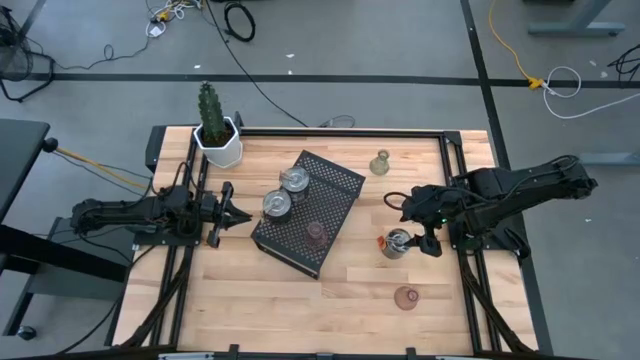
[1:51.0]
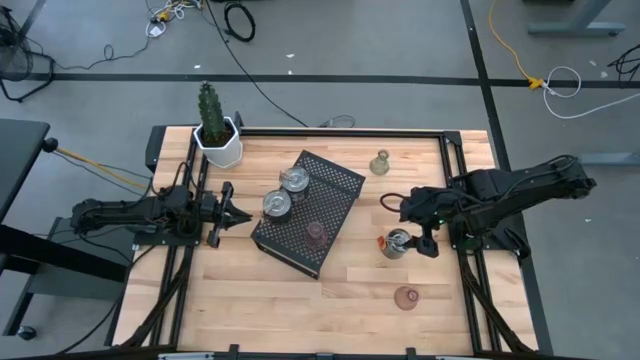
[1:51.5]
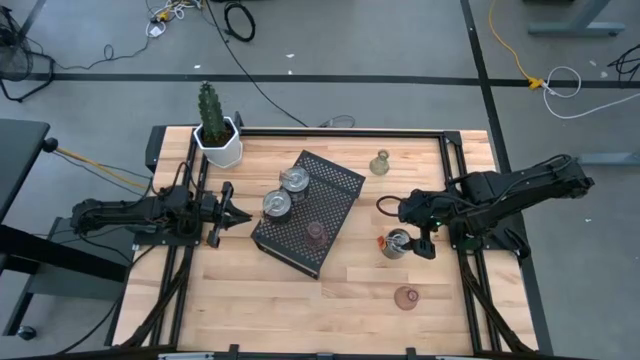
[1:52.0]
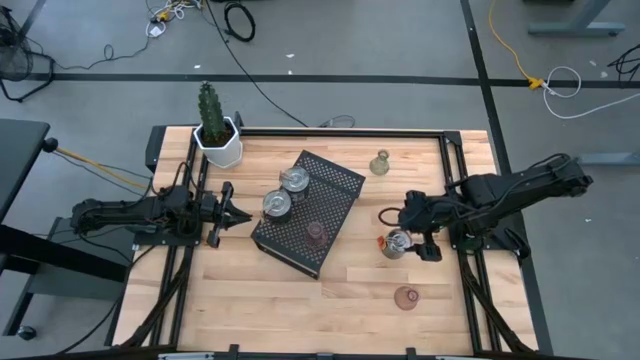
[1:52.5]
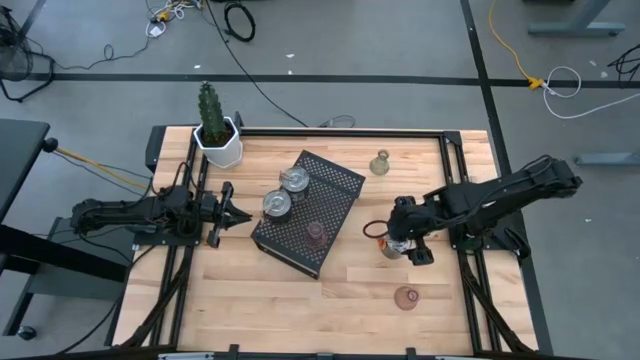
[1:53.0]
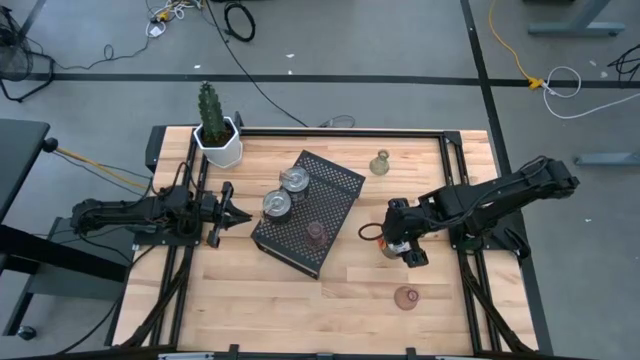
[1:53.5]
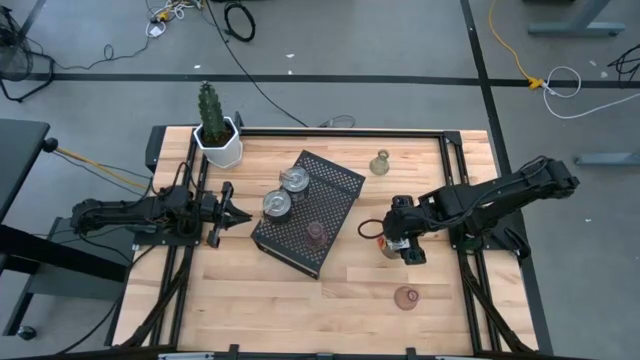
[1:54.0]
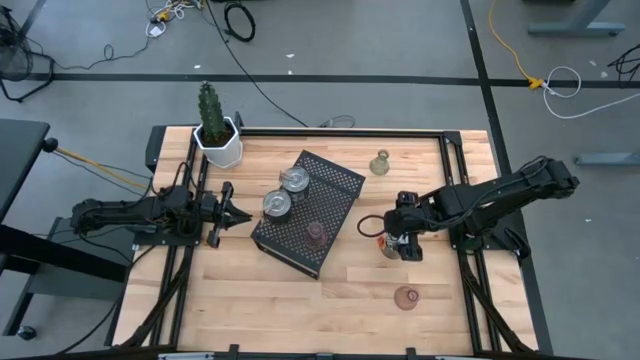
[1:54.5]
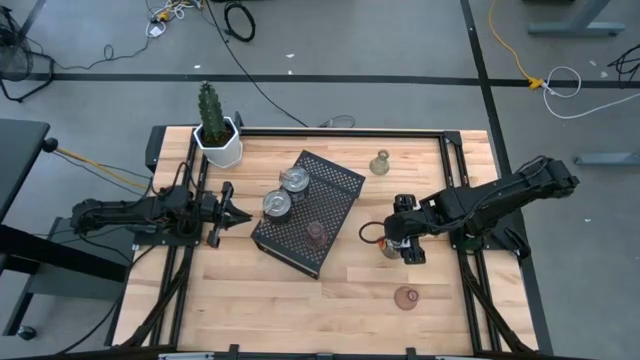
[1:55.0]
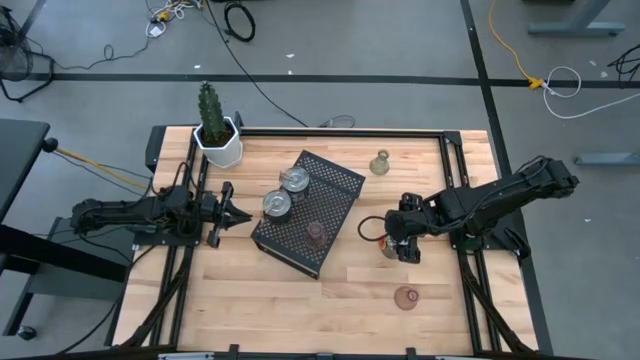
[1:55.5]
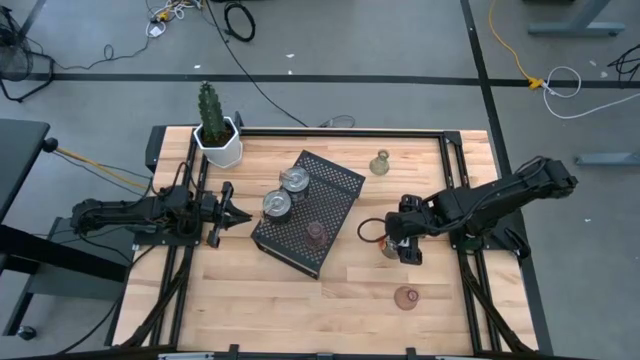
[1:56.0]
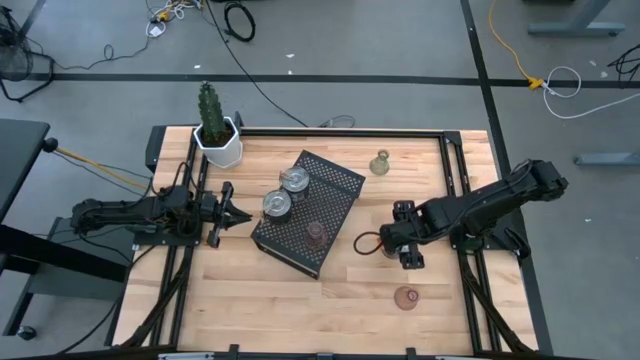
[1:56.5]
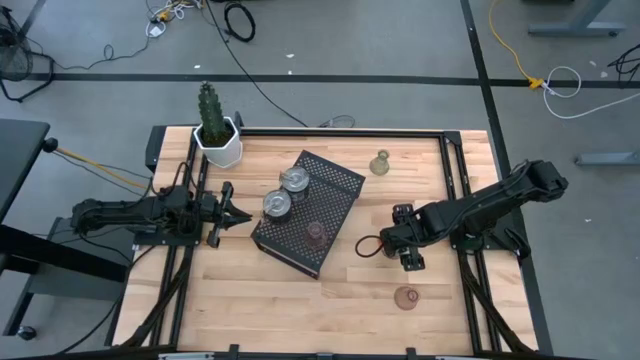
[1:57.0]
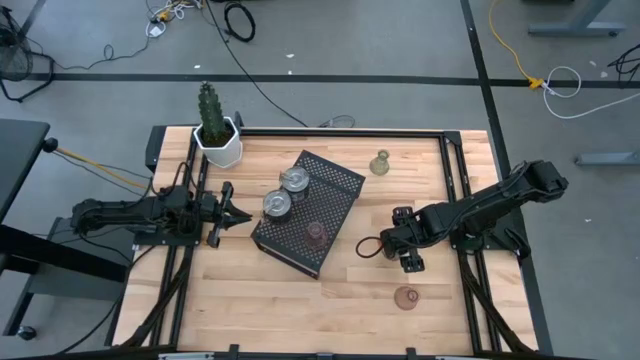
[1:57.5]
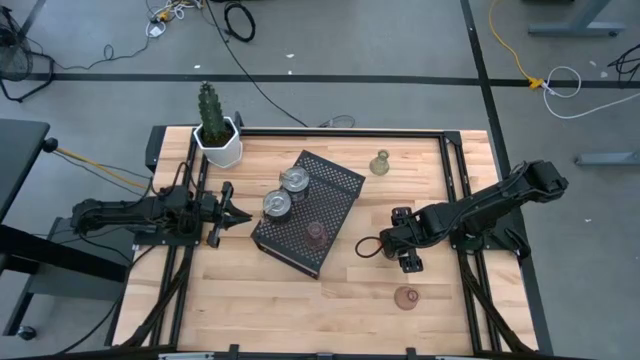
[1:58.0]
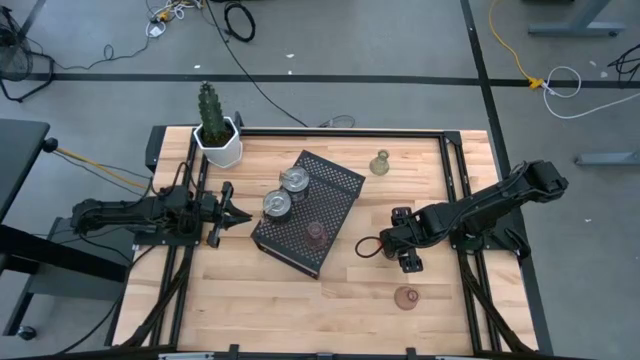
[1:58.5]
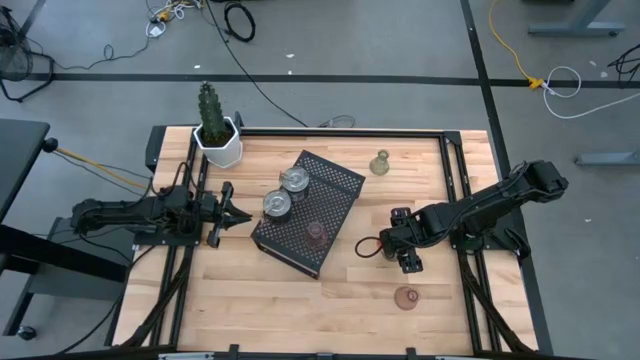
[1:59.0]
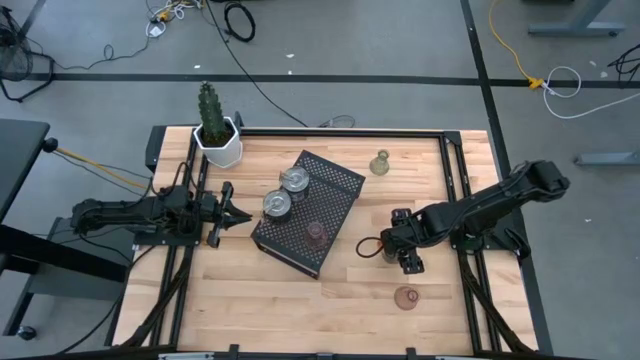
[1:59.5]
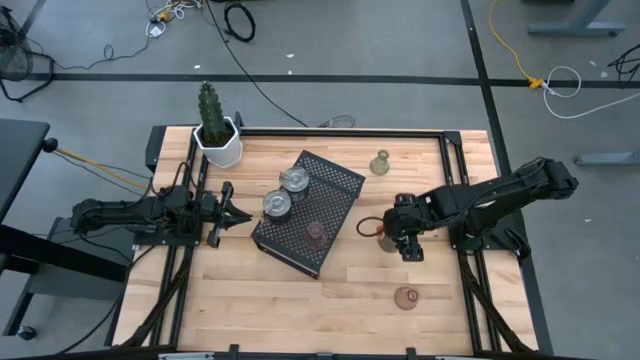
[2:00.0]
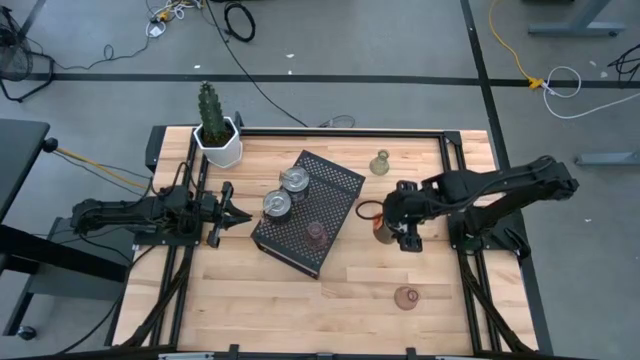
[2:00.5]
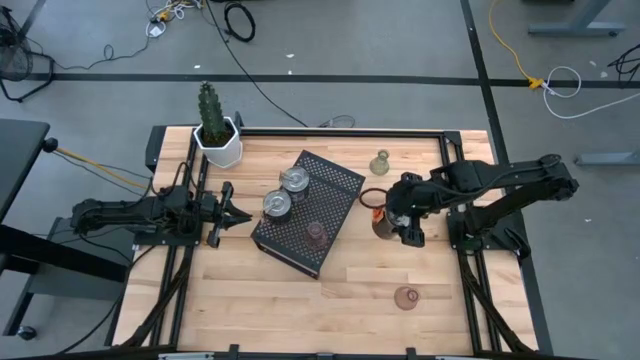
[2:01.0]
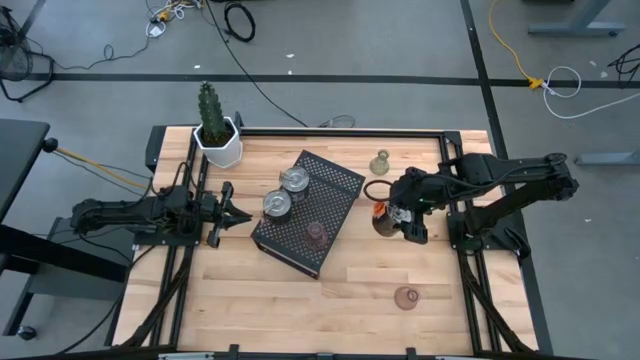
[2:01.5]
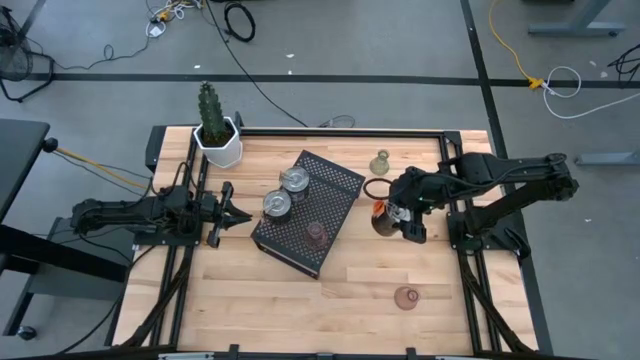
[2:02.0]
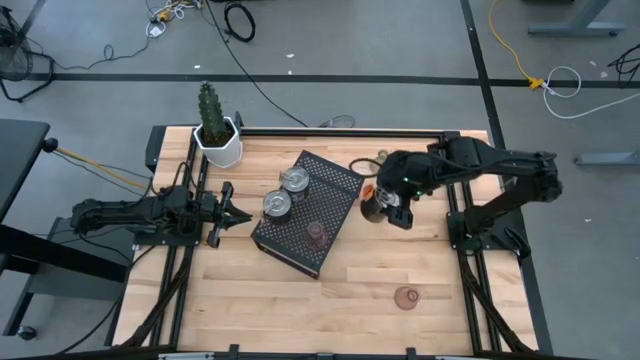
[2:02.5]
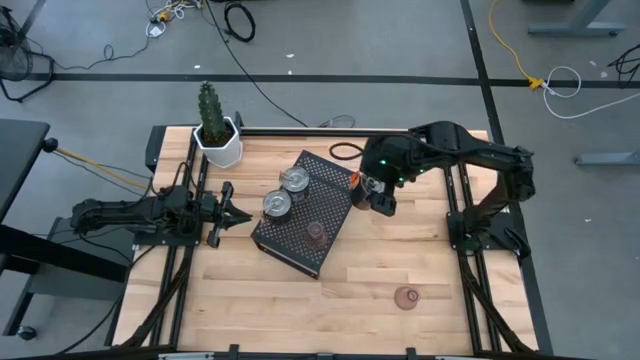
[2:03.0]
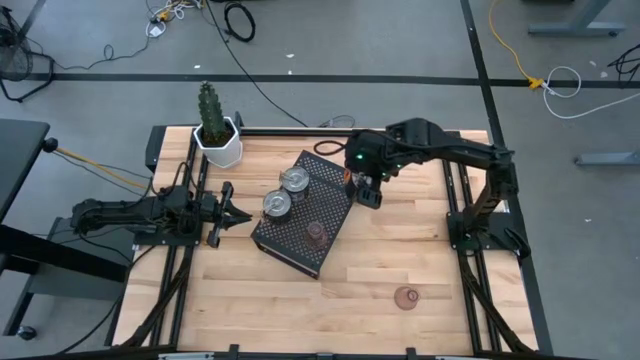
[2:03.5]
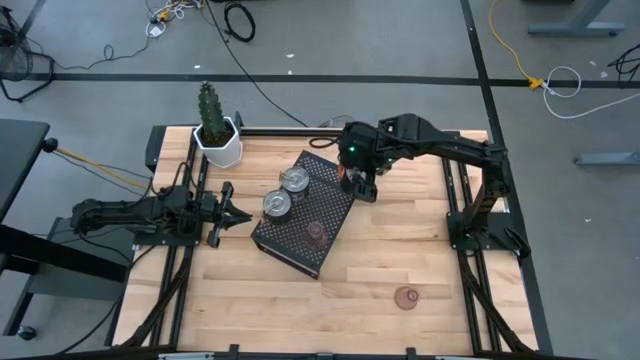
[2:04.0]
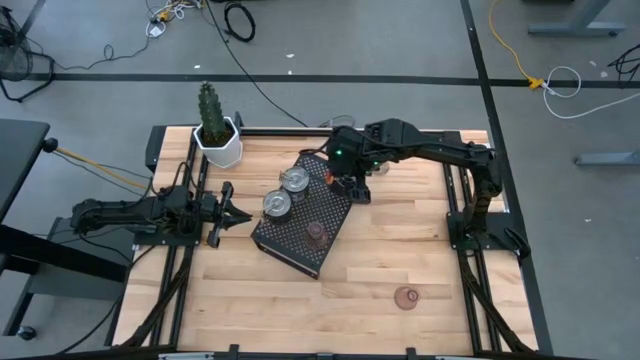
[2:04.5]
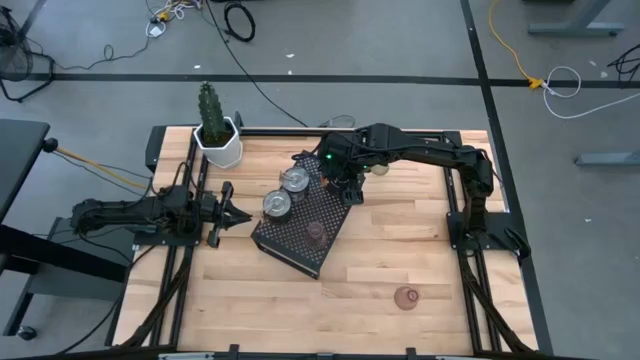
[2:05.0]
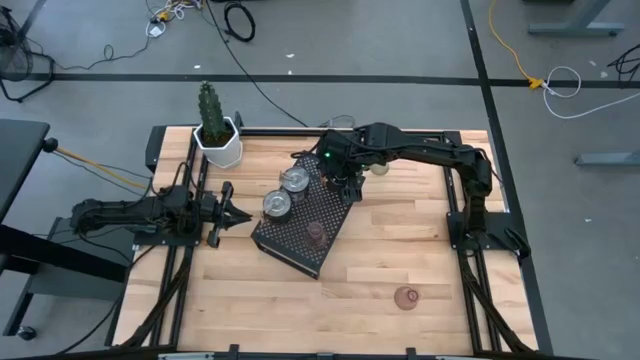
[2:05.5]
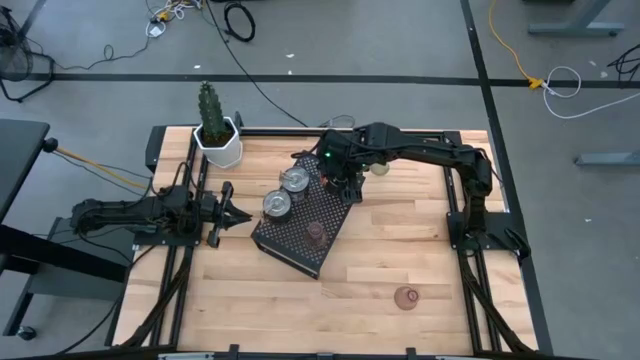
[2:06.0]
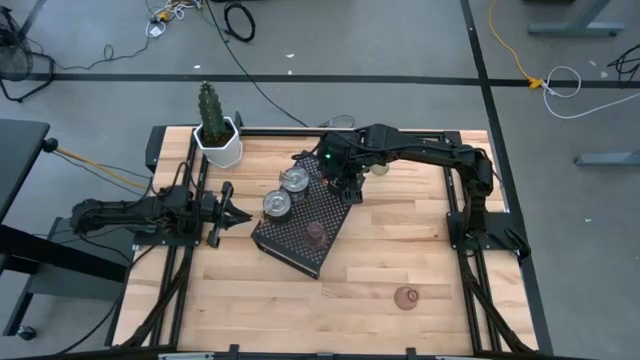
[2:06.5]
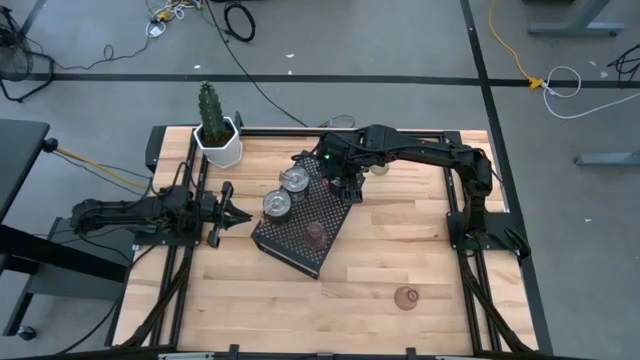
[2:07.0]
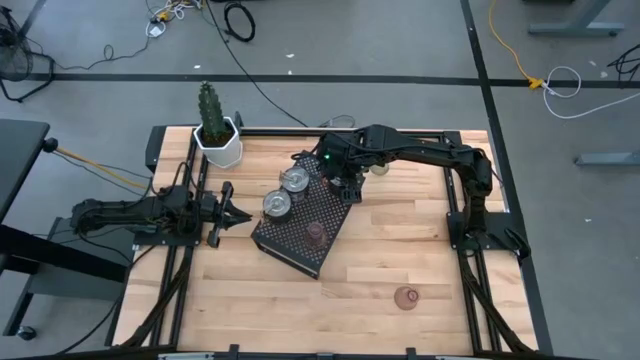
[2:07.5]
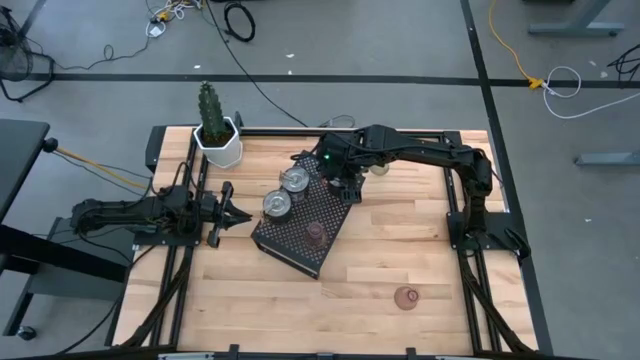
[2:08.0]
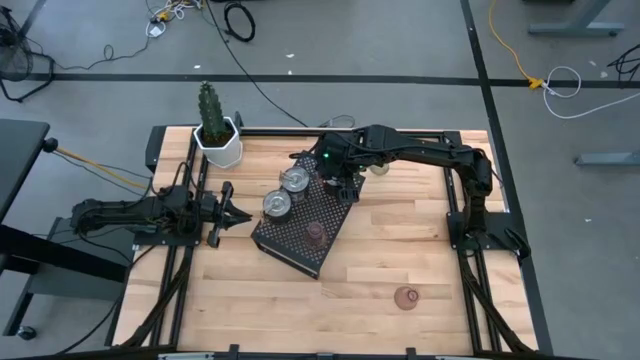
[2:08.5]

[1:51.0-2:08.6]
Task: Pick & Place candle stick holders
Put the silver scented candle on the shelf
